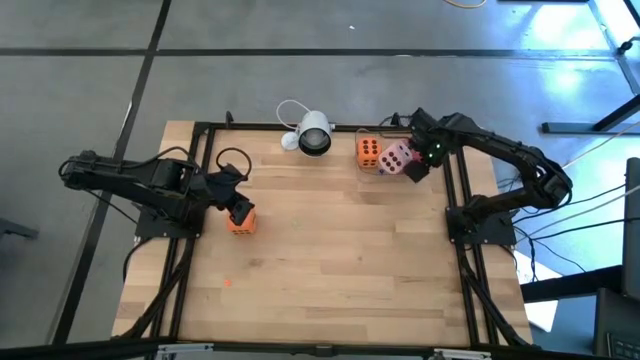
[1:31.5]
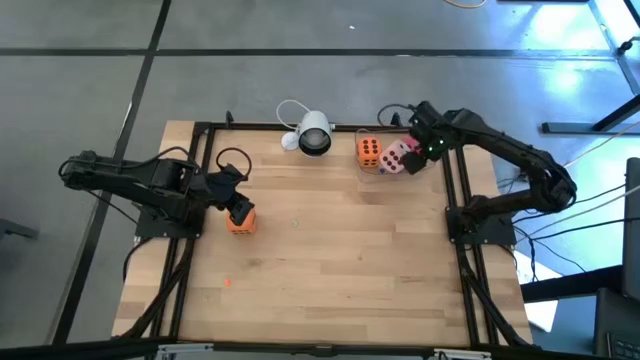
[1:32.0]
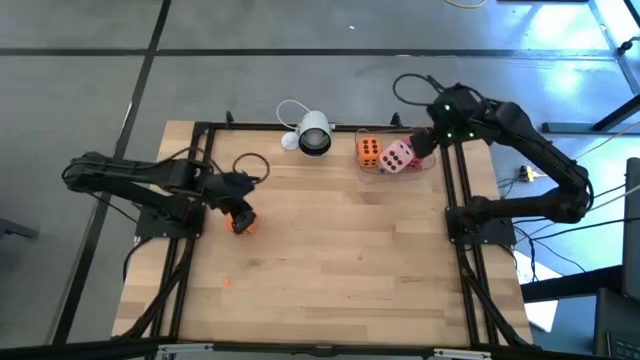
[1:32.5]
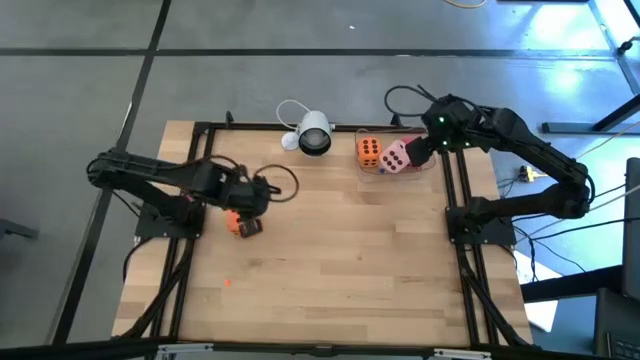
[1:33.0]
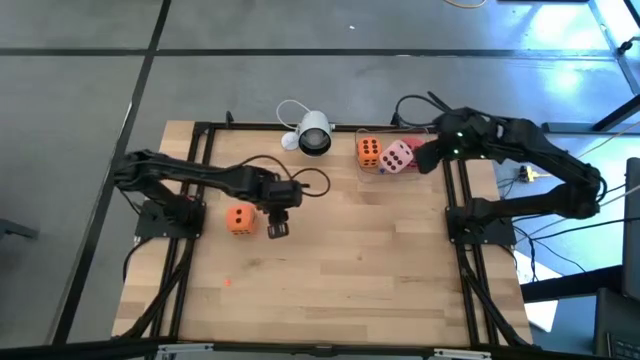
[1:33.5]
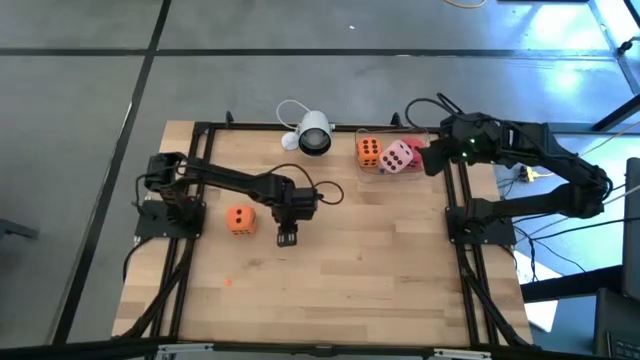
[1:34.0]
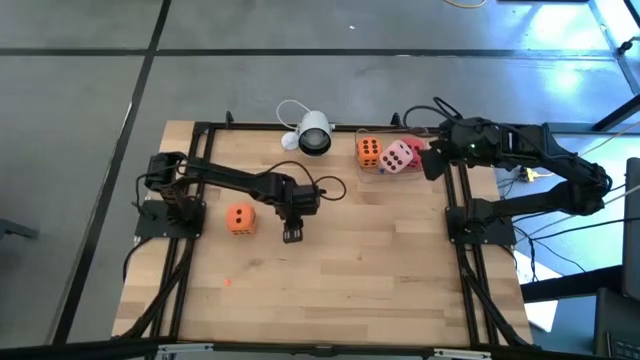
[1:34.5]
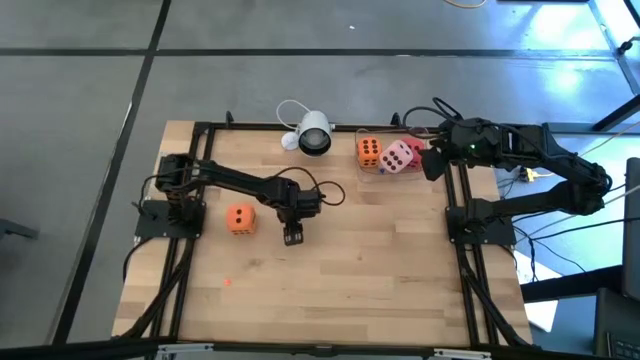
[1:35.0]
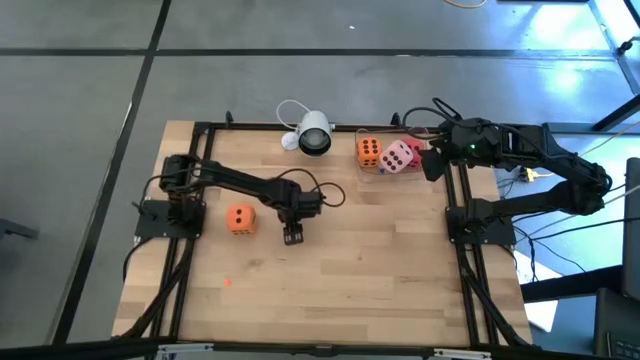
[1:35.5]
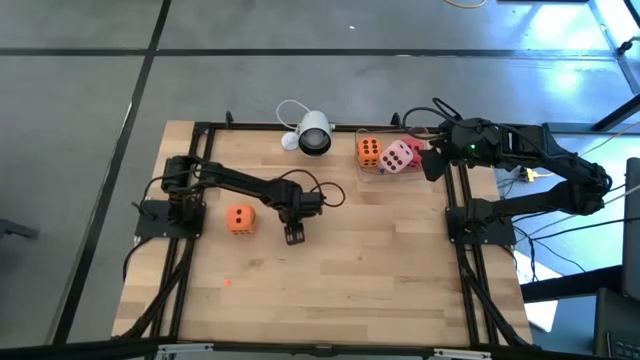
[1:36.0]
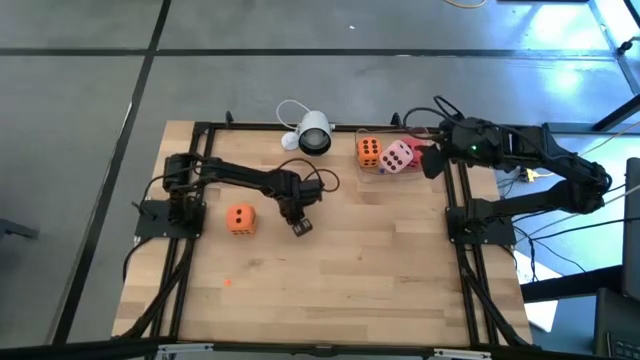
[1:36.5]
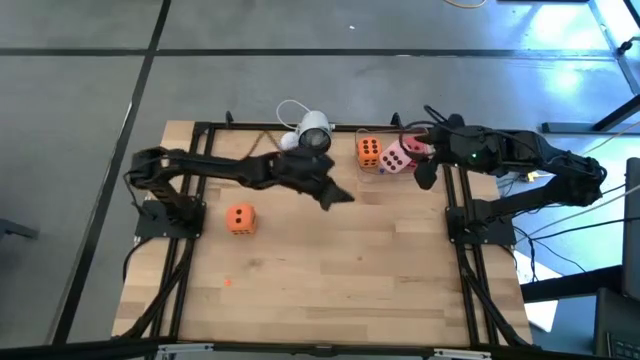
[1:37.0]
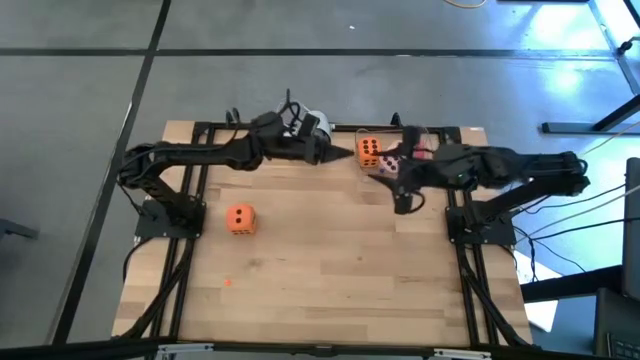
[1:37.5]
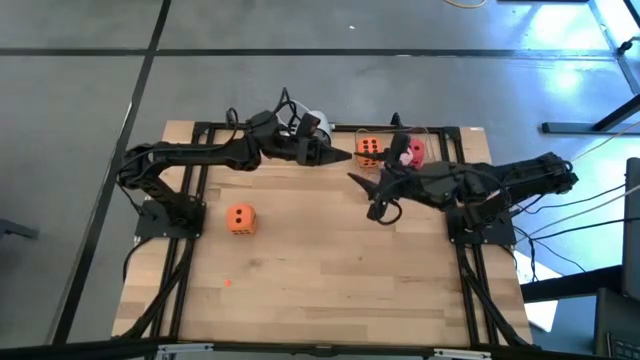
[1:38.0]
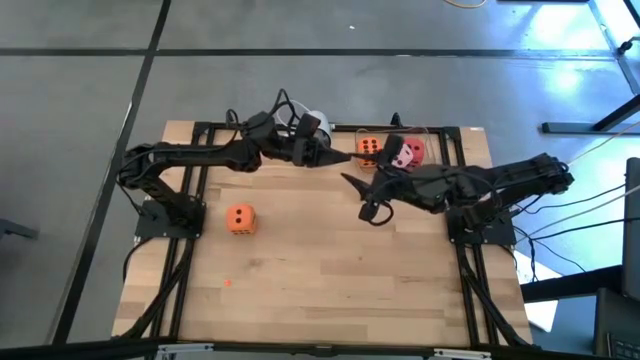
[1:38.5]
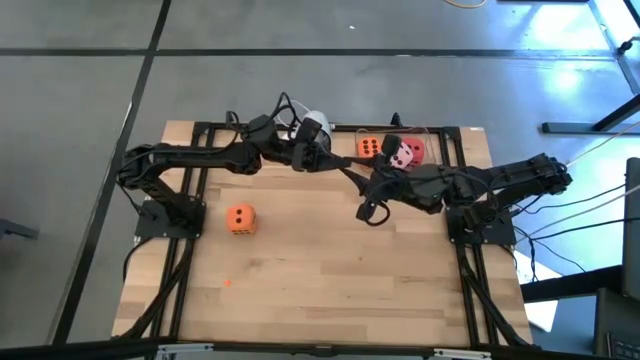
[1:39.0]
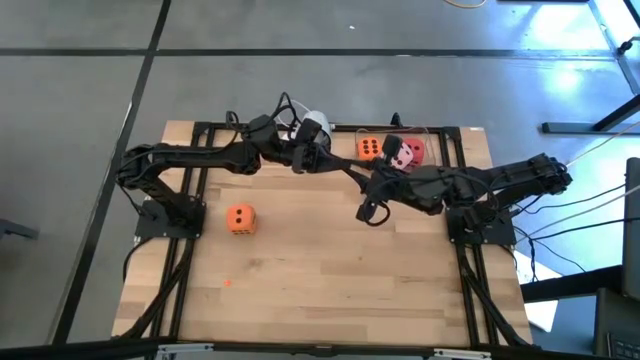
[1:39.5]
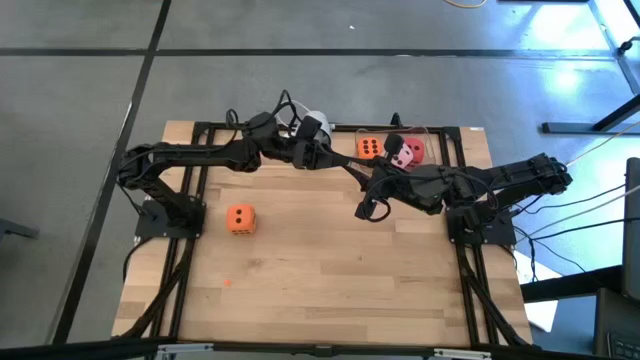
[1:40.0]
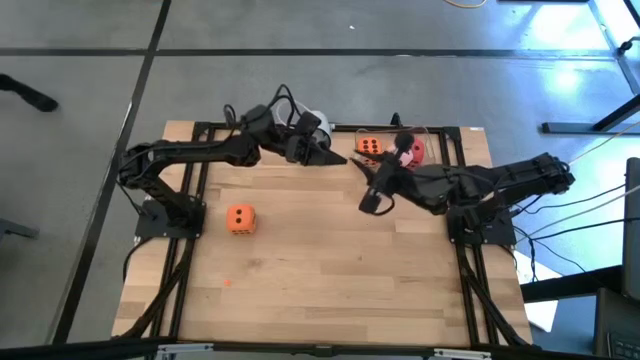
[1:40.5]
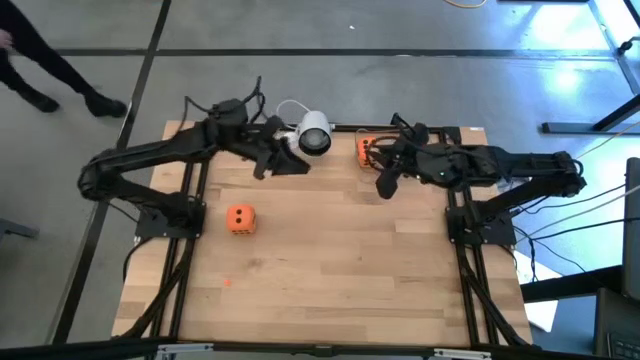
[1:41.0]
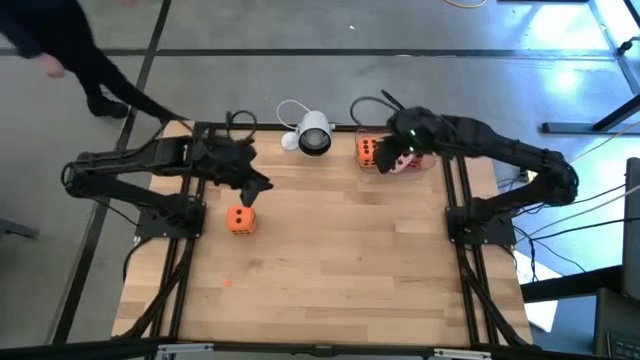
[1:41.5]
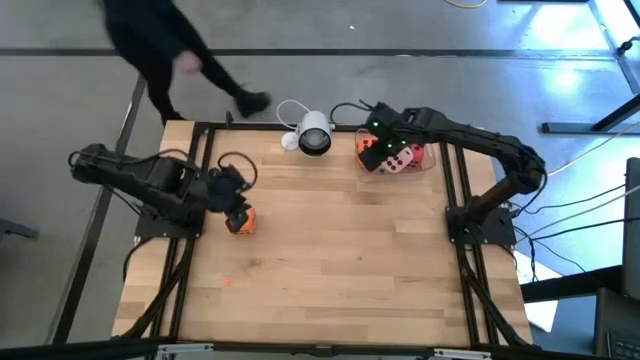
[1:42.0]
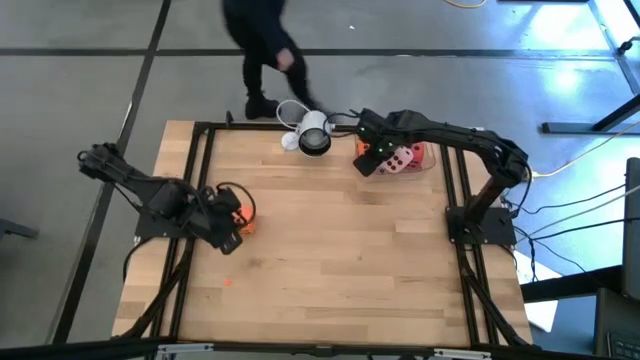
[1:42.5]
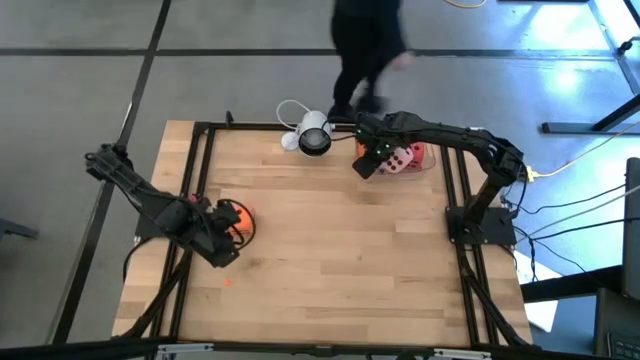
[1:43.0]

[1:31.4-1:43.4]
Task: Pick & Place Dice
Put the small green dice into the transparent container

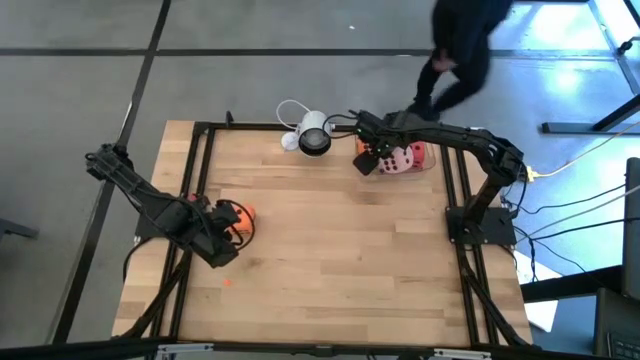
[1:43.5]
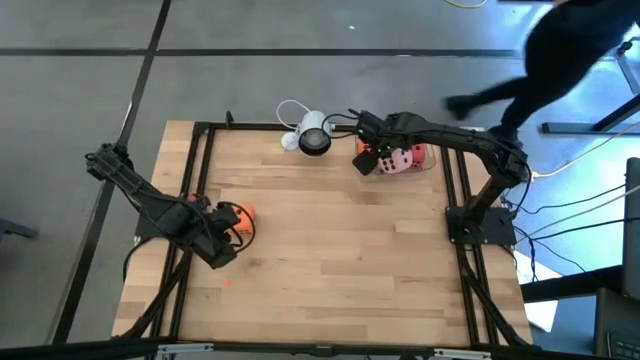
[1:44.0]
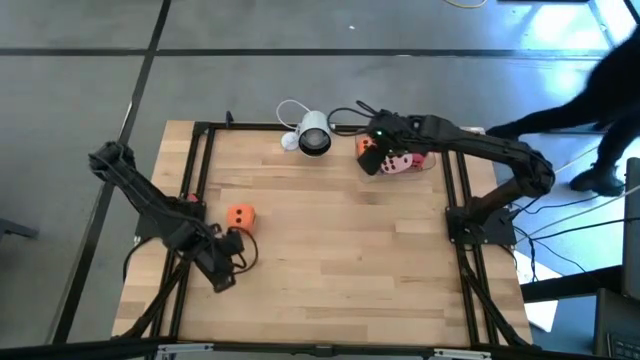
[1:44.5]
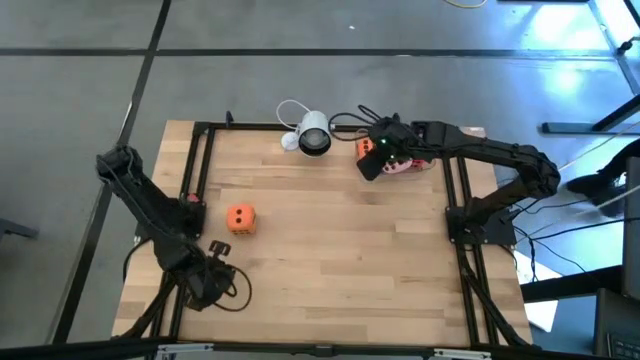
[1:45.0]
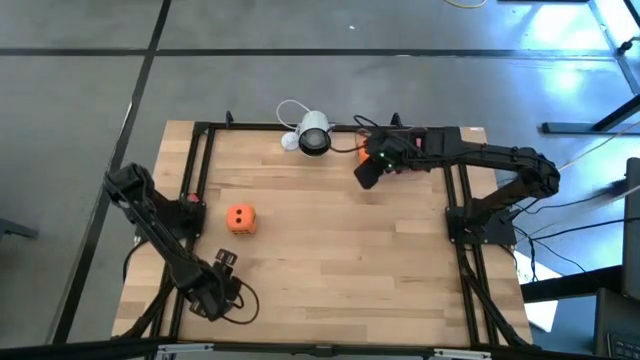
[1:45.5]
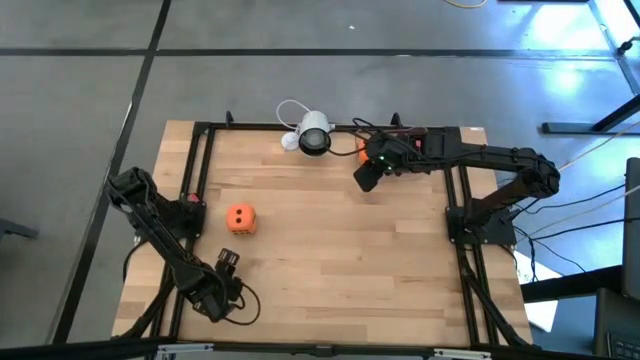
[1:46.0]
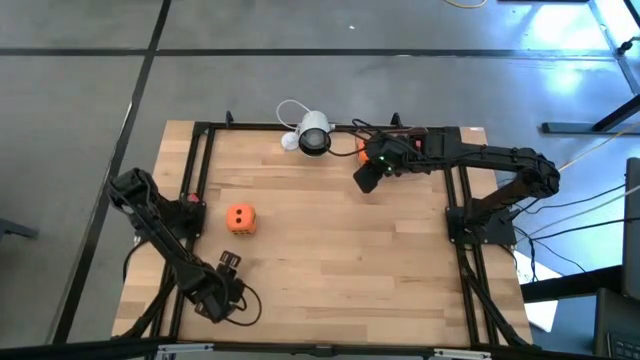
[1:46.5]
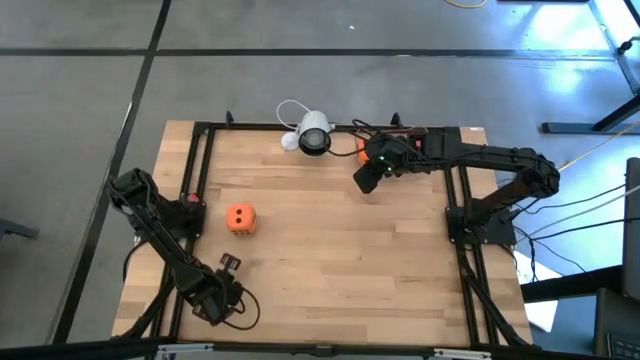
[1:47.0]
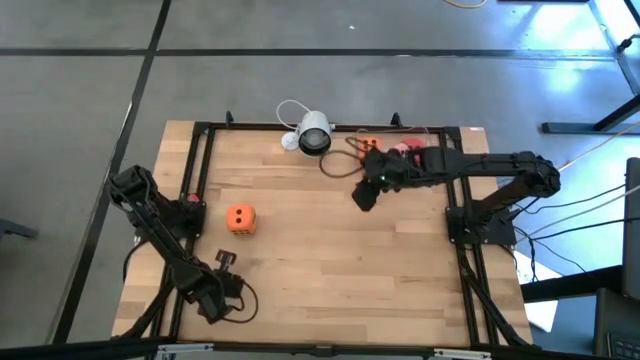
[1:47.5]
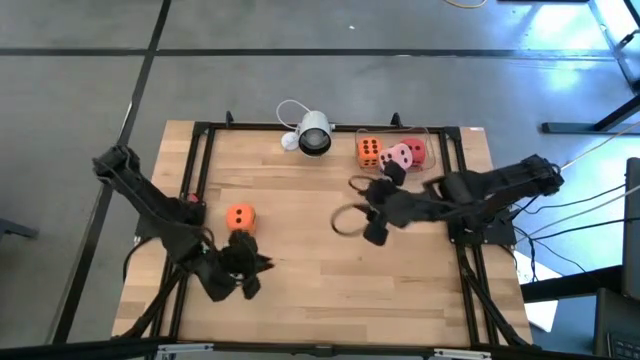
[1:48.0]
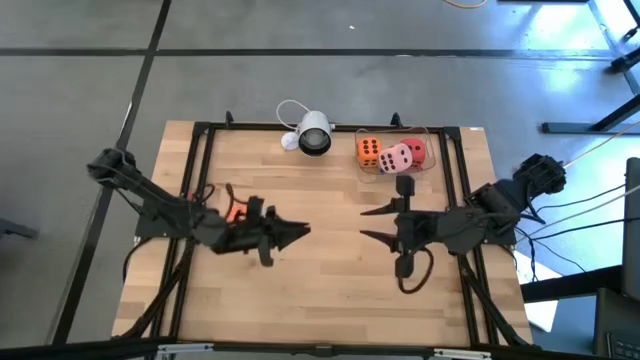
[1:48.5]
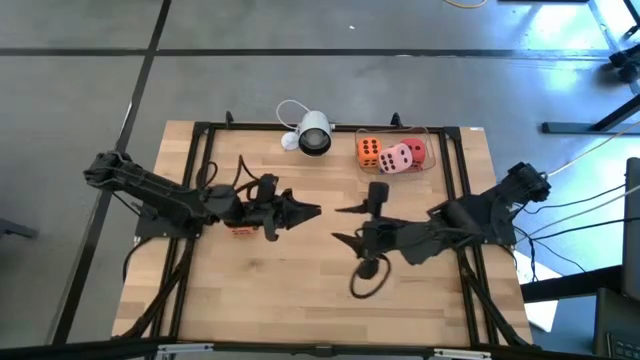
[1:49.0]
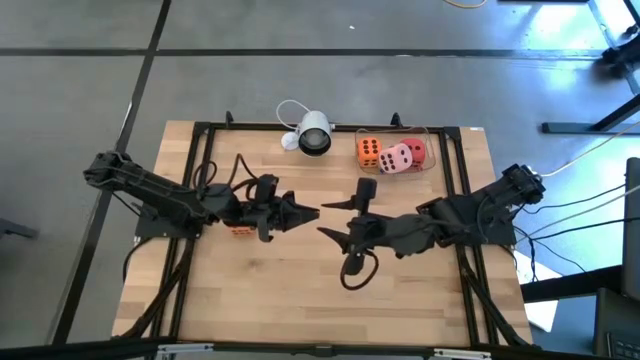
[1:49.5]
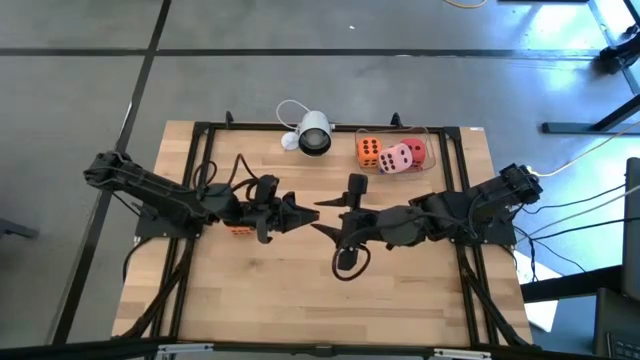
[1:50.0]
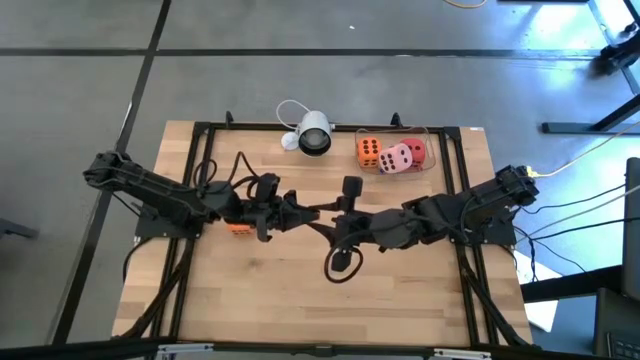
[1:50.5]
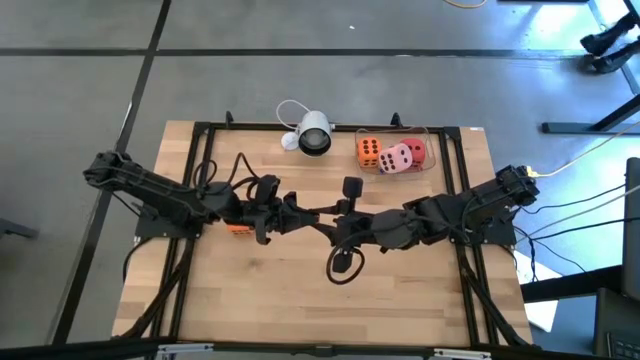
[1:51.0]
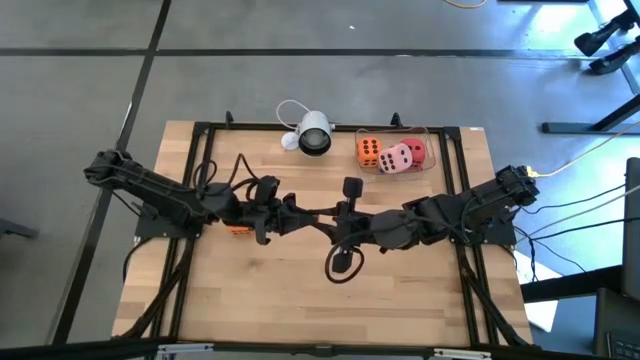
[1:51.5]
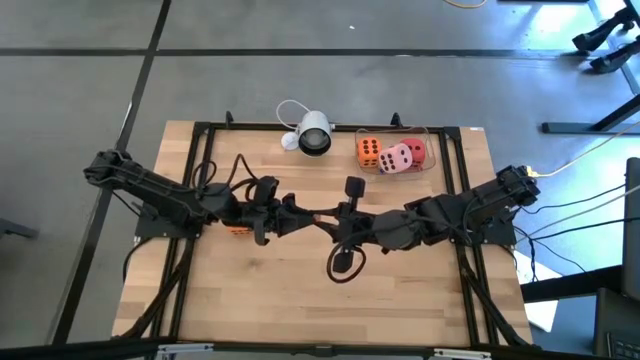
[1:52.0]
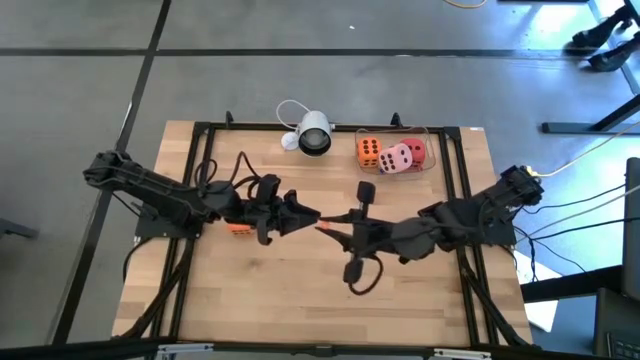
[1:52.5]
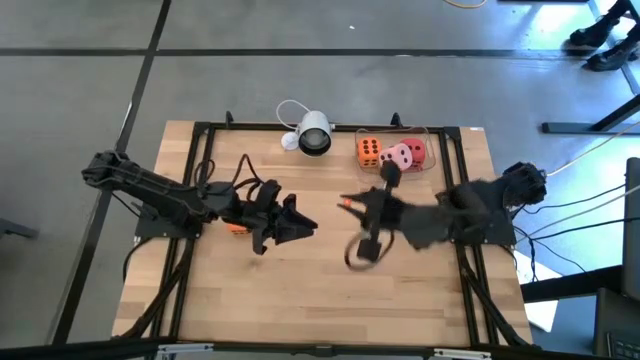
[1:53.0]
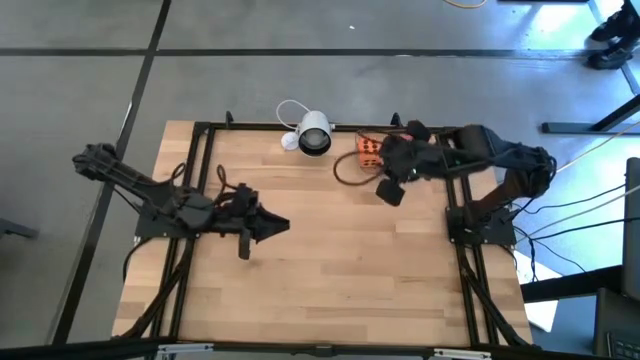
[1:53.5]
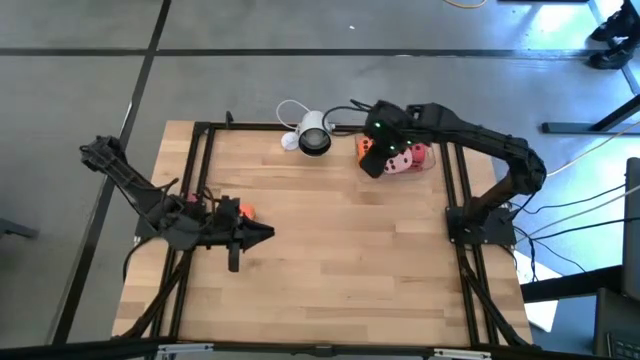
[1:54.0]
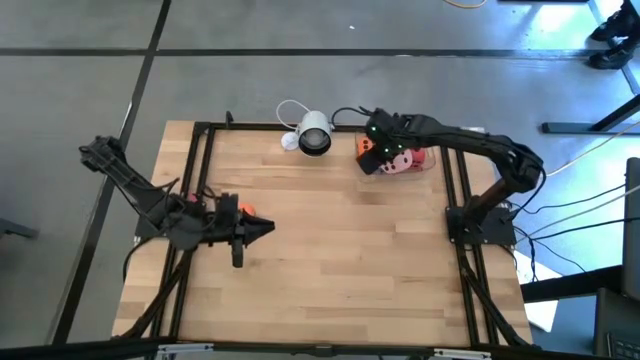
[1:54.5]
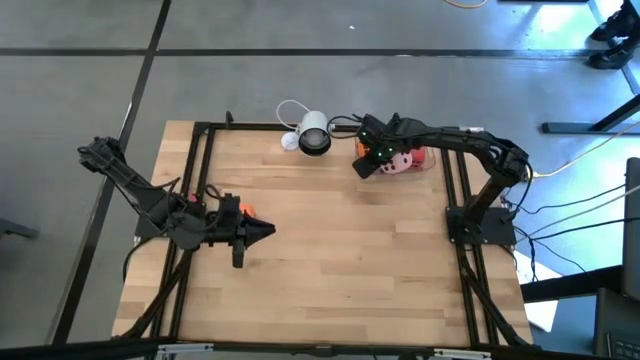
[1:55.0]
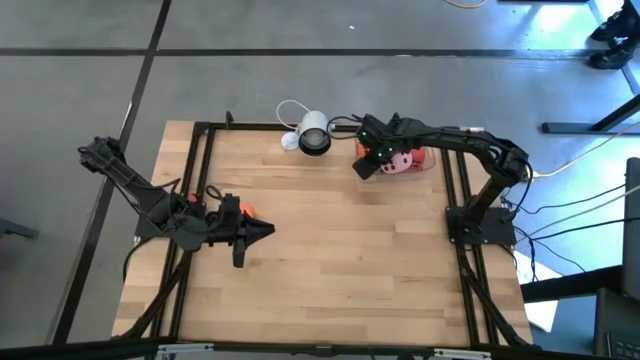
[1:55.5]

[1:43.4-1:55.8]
Put the small orange dice into the transparent container
